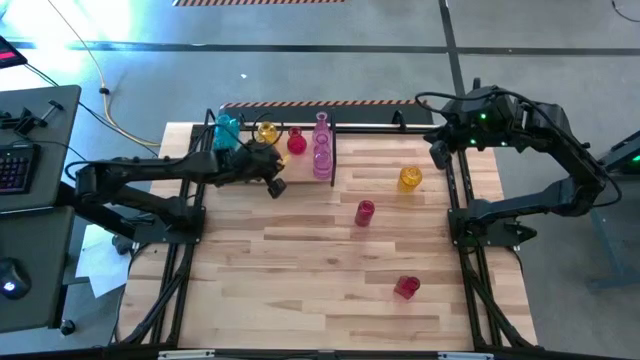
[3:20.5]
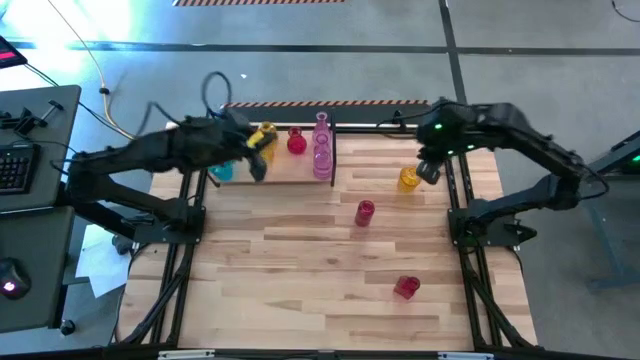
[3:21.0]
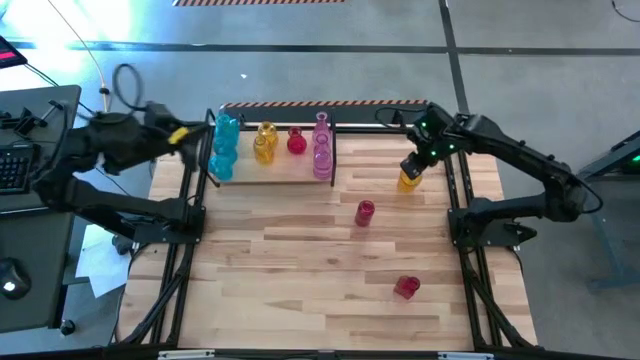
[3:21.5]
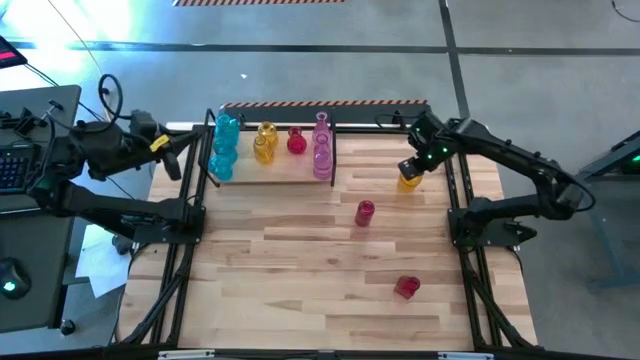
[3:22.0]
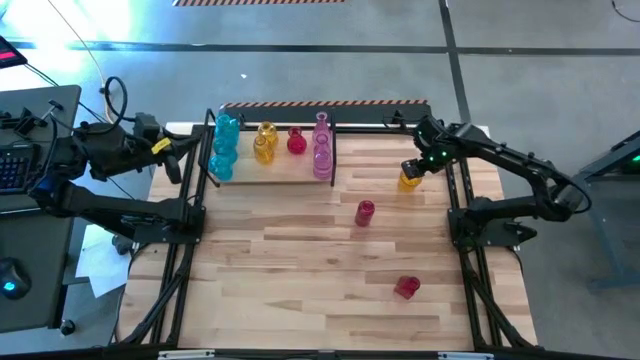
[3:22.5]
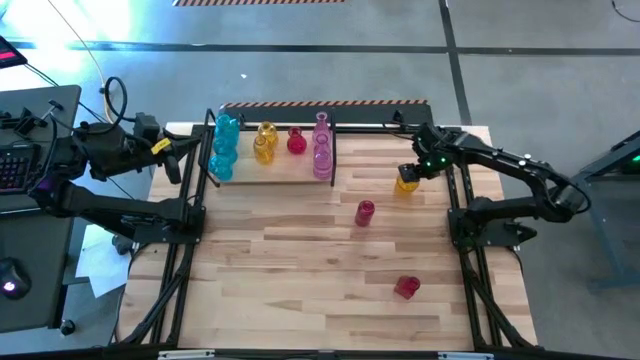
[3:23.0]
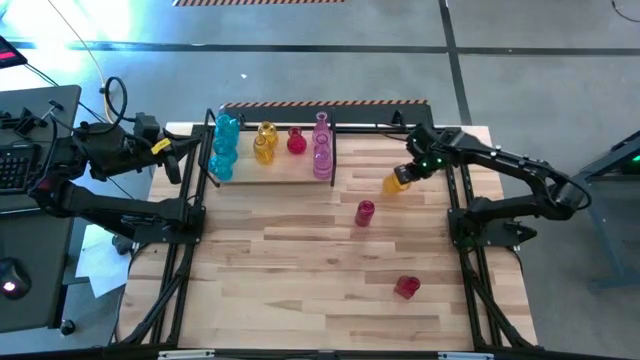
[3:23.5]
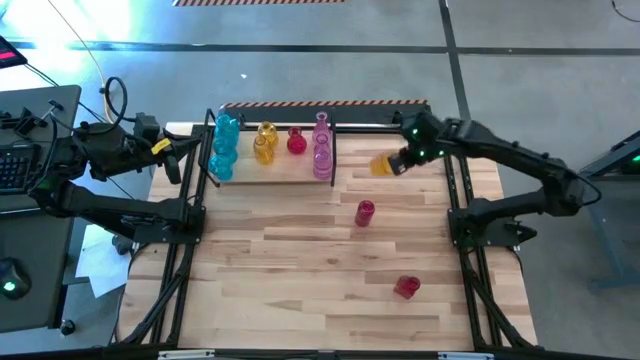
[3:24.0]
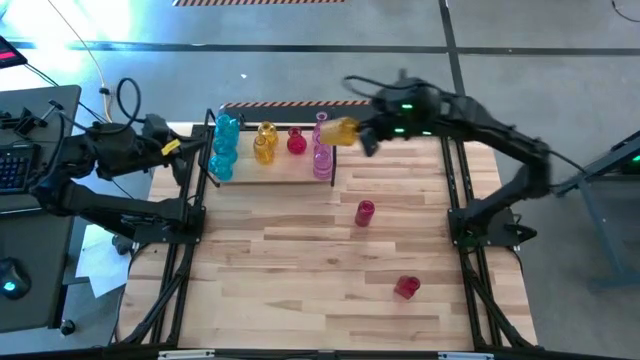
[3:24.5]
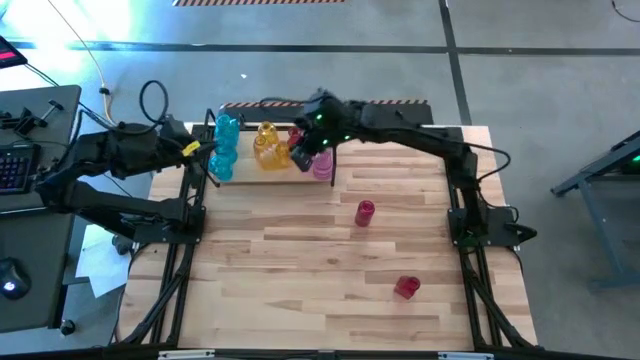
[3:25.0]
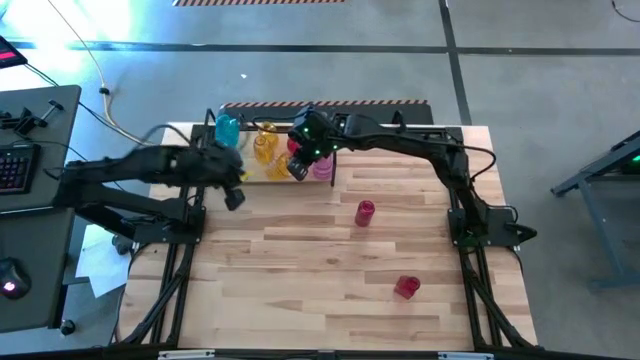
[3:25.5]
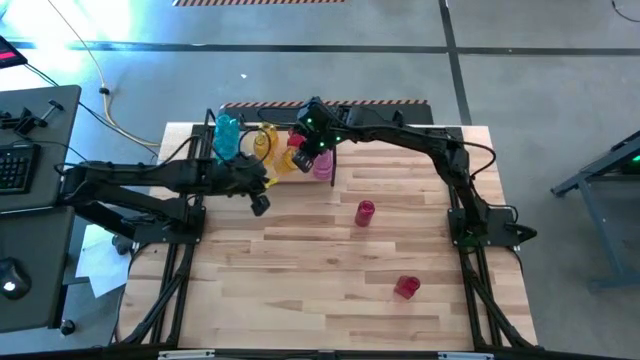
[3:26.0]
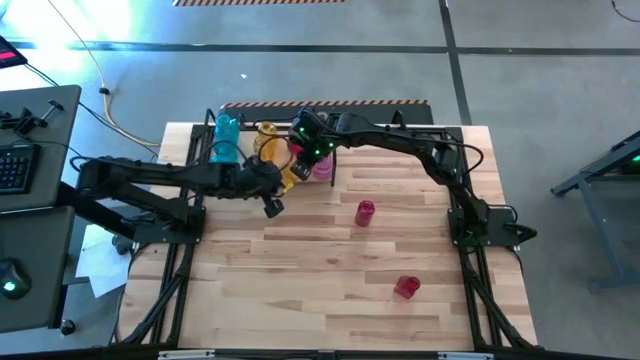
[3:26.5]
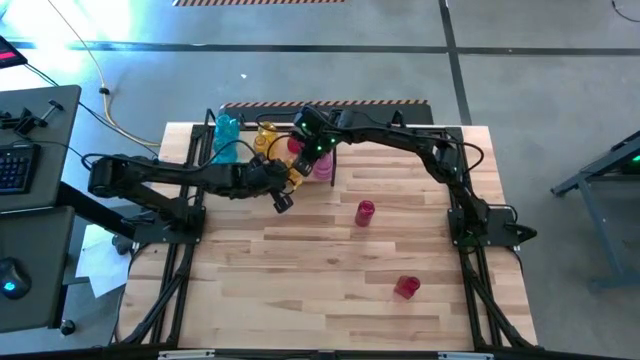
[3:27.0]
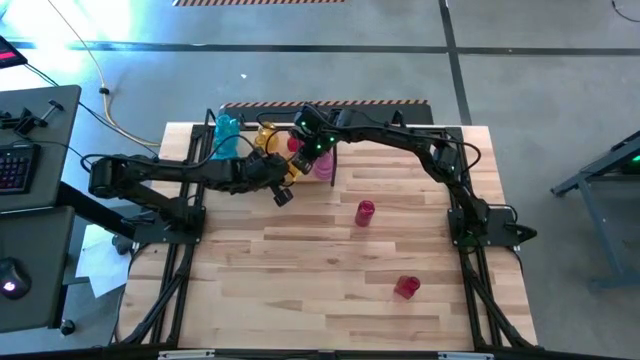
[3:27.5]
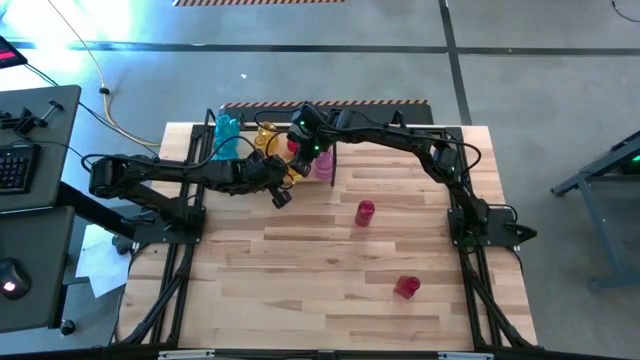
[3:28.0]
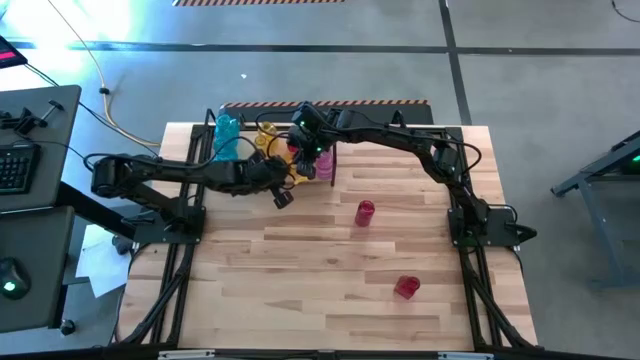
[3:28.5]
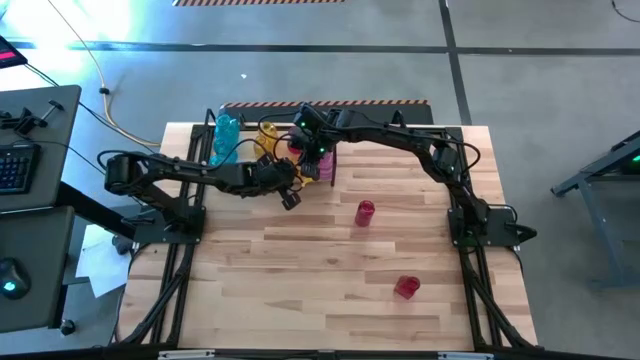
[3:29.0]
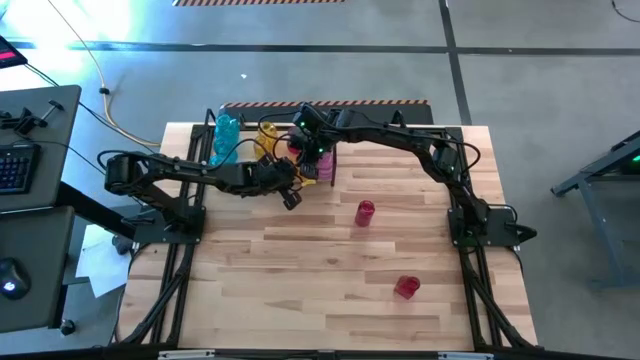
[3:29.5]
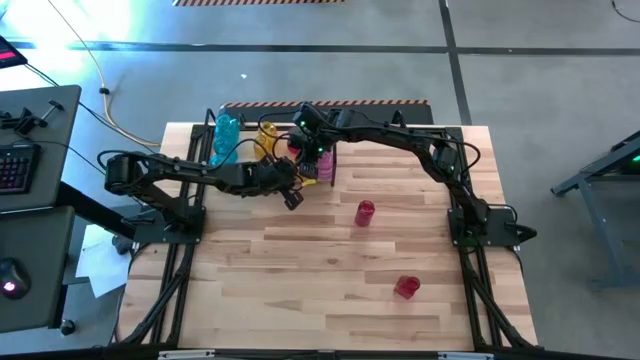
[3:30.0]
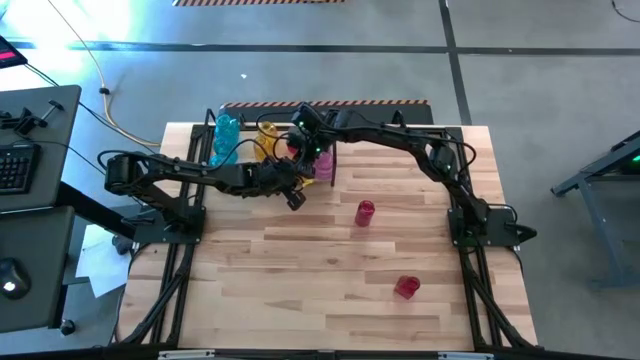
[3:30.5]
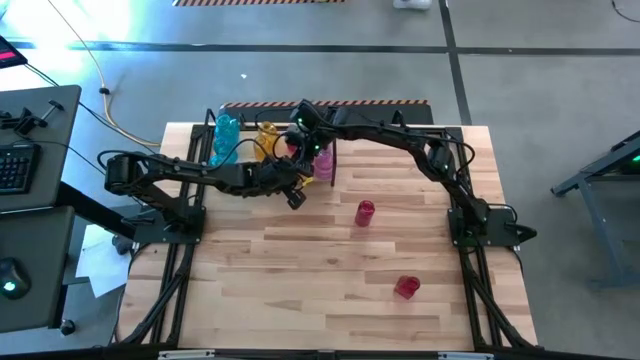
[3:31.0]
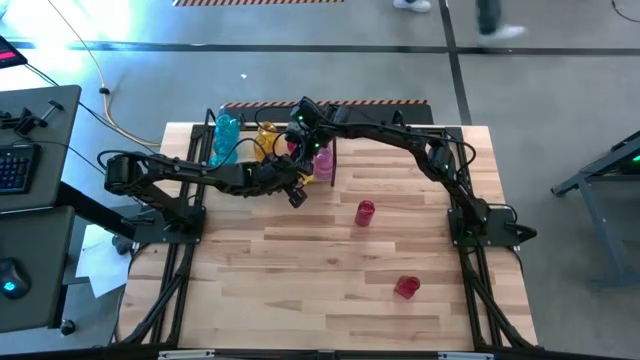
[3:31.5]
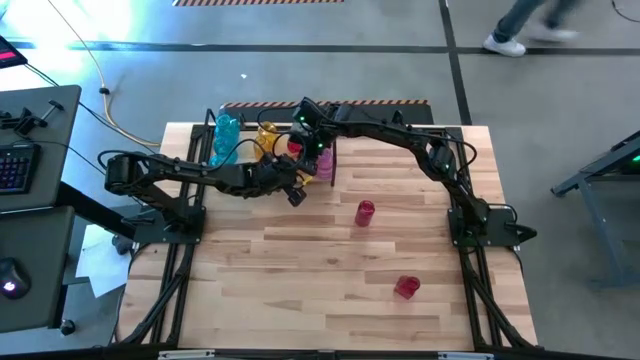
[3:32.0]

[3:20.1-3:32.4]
Task: sort vases onto shelf
Put the yellow vase on the shelf aligned with the other yellow vase

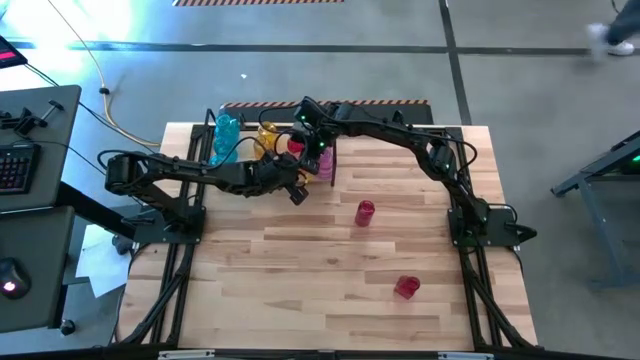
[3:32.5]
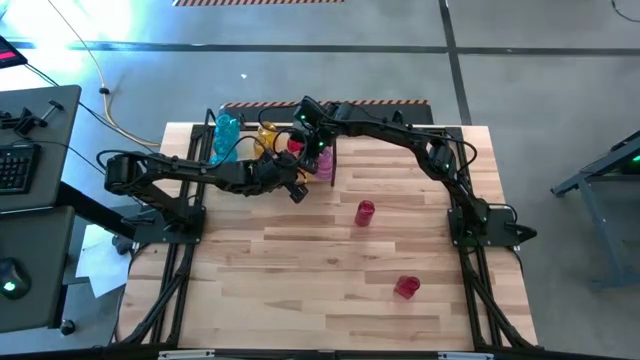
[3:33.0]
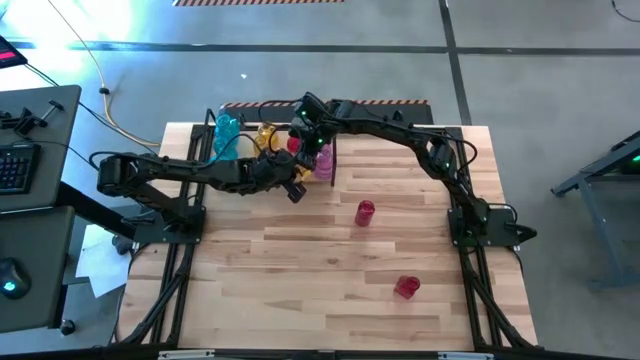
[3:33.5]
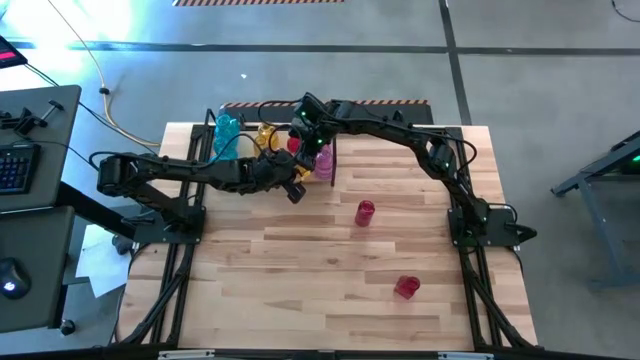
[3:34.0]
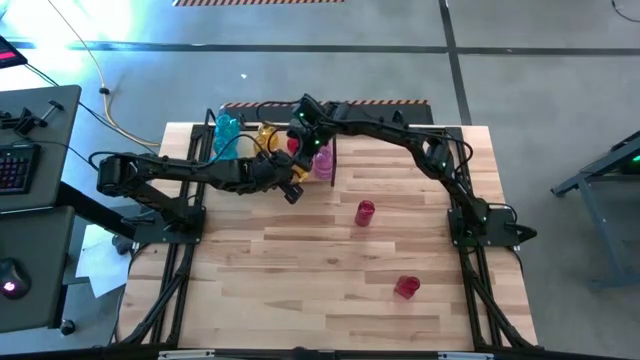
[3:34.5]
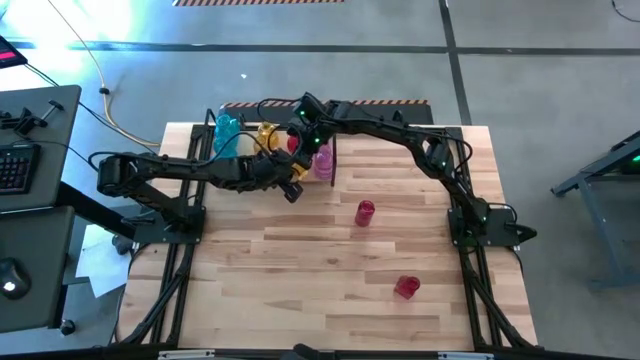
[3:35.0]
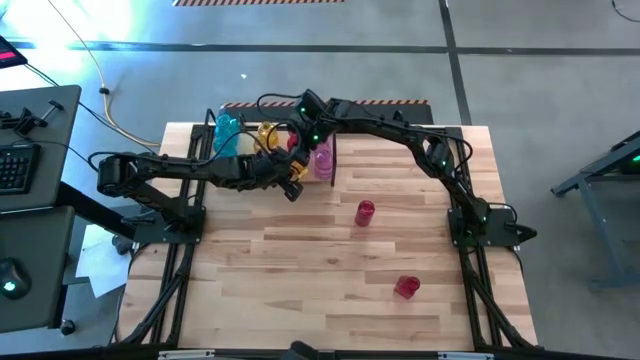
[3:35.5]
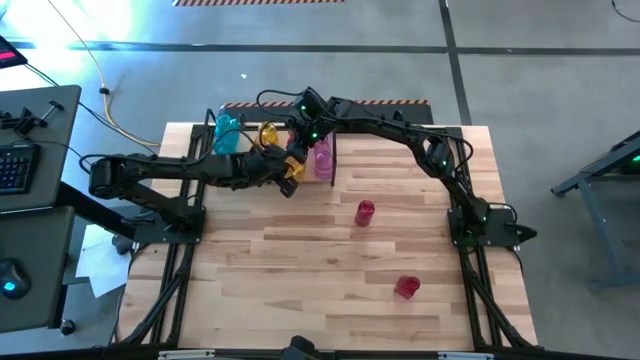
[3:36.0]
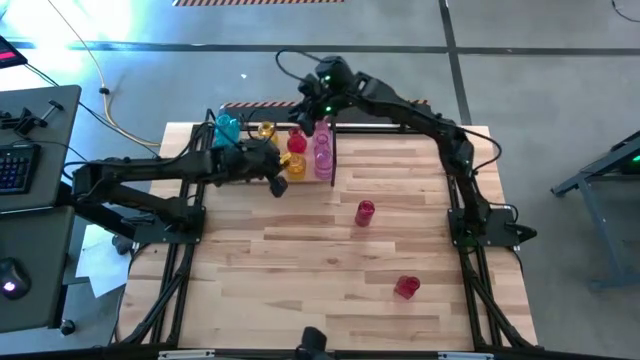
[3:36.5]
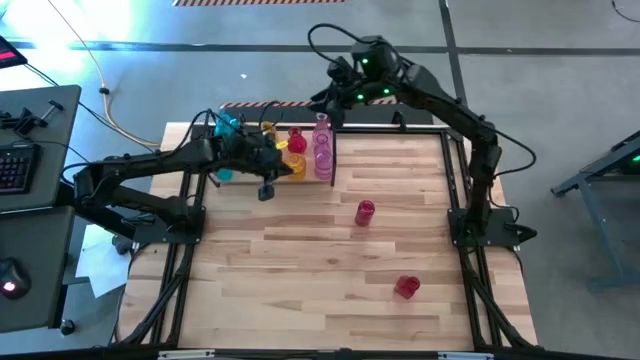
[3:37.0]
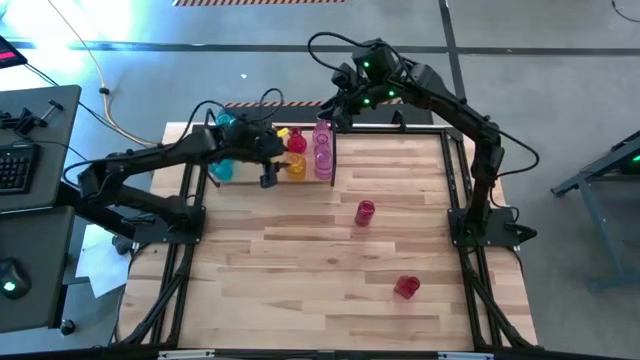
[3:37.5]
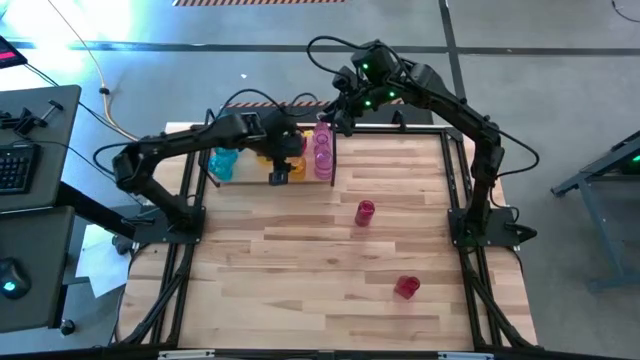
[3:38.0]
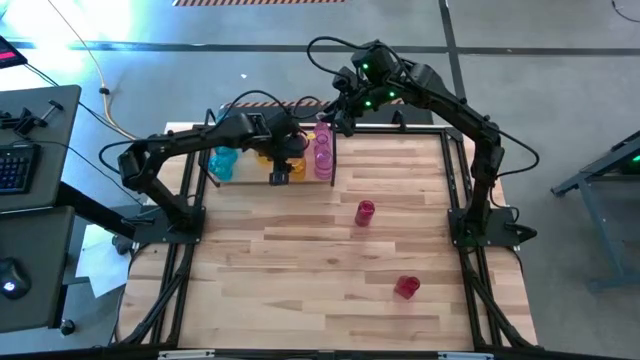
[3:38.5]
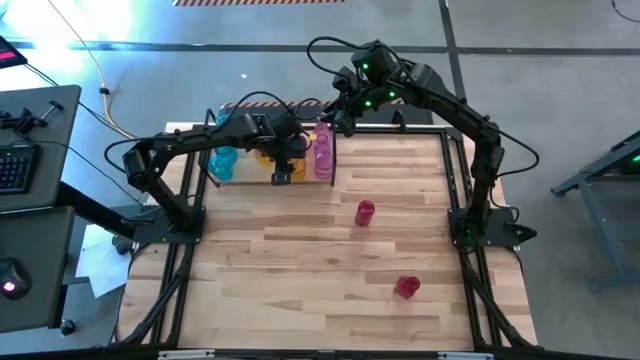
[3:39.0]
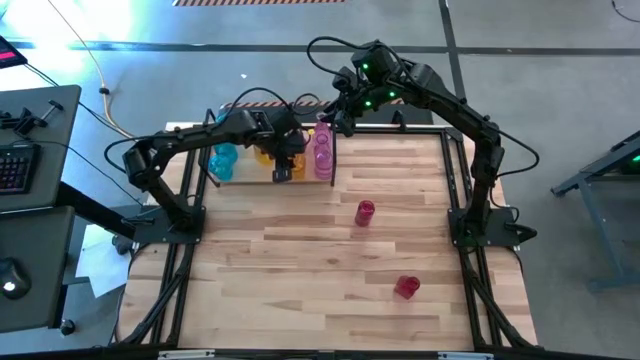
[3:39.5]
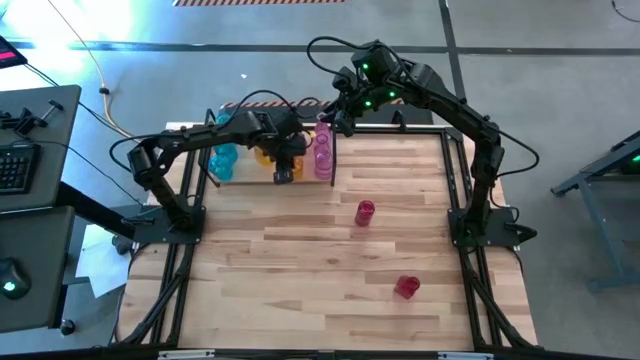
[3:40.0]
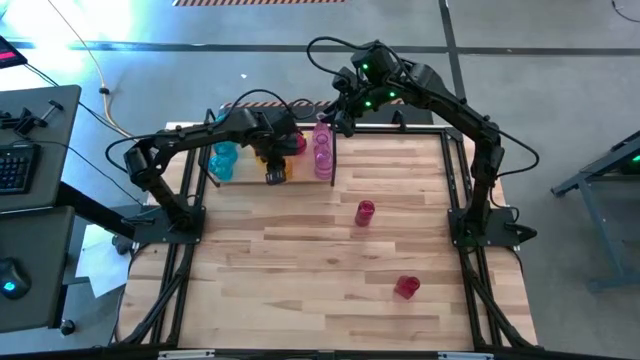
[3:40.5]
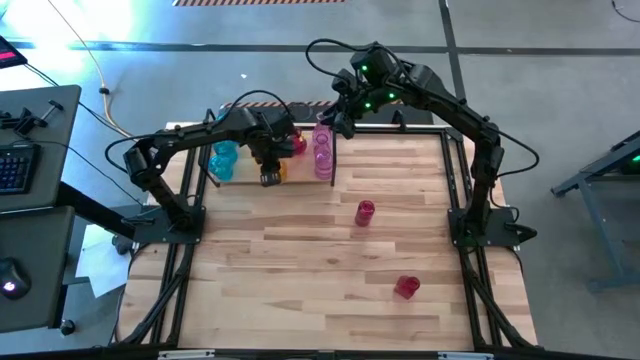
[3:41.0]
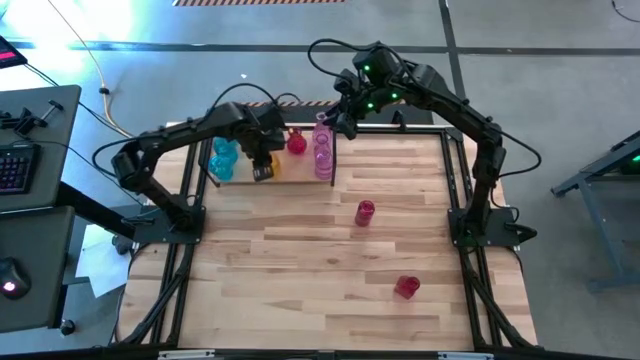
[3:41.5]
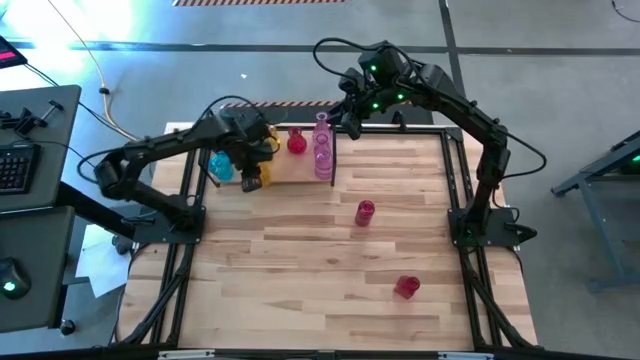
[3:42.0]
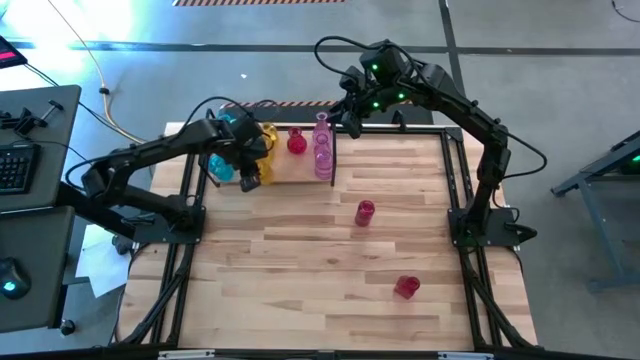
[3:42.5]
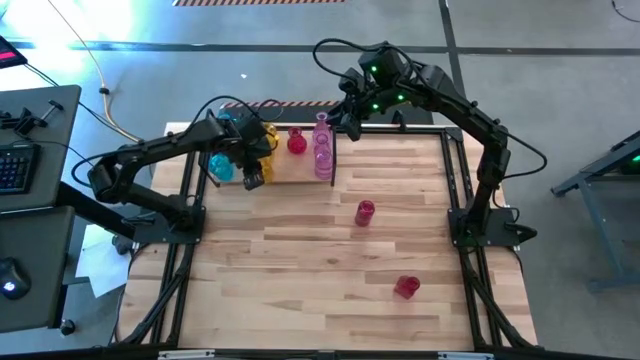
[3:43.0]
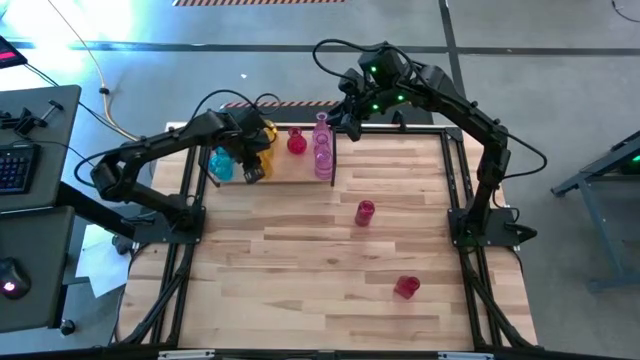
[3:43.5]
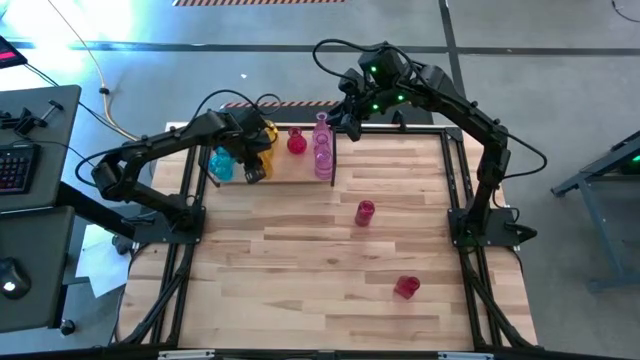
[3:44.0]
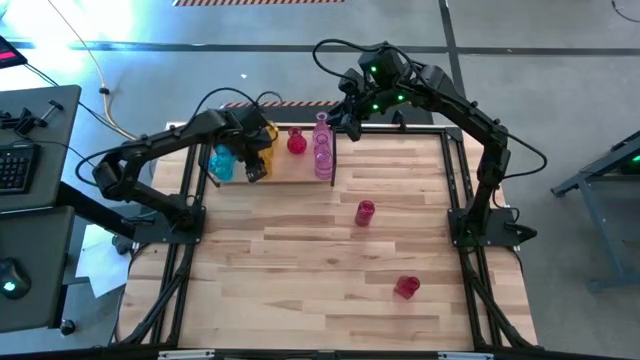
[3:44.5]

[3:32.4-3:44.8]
Put the yellow vase on the shelf aligned with the other yellow vase
